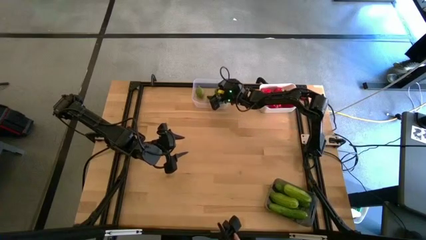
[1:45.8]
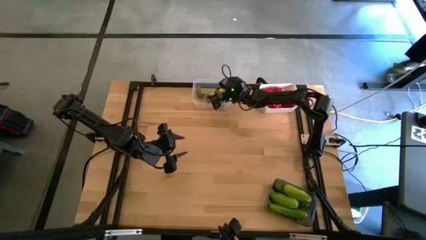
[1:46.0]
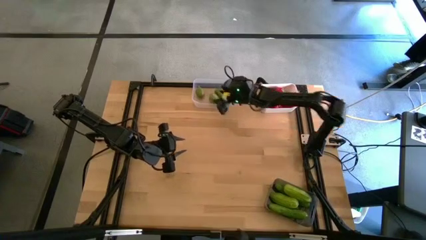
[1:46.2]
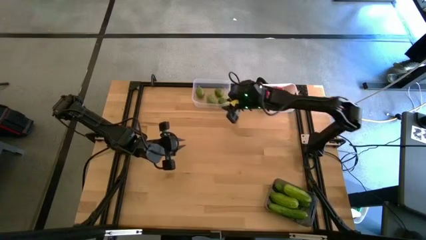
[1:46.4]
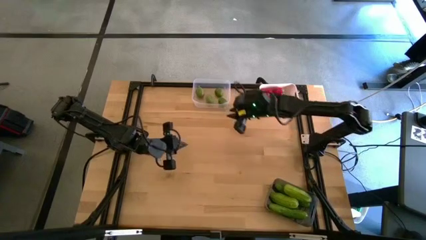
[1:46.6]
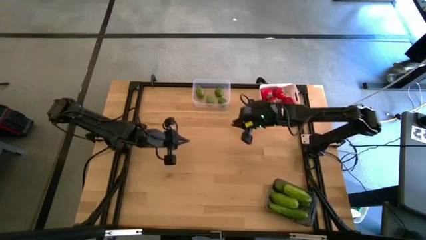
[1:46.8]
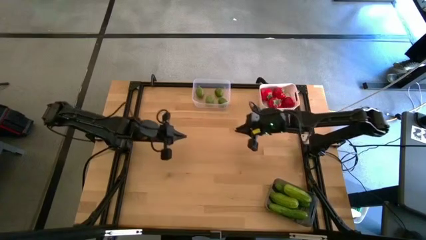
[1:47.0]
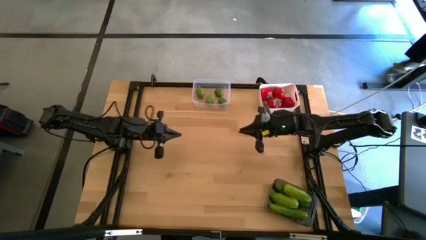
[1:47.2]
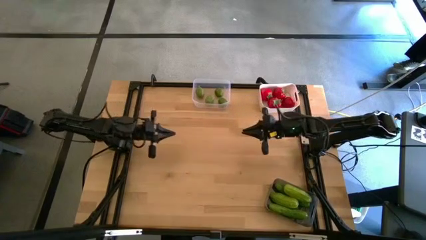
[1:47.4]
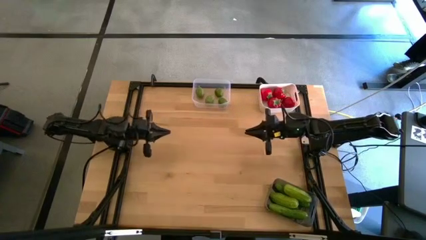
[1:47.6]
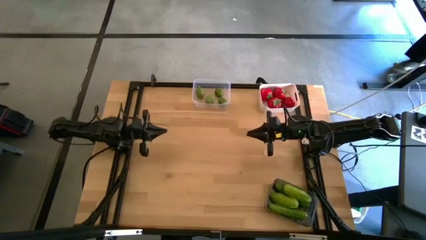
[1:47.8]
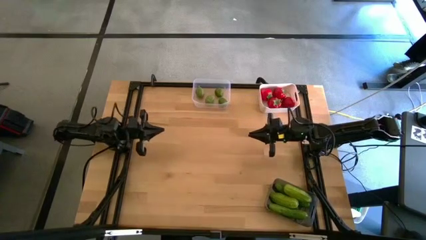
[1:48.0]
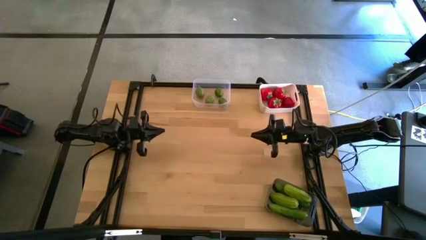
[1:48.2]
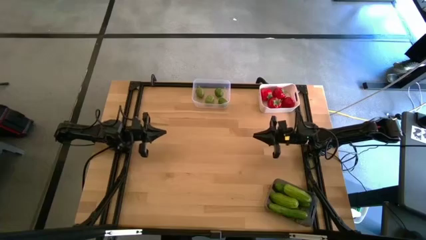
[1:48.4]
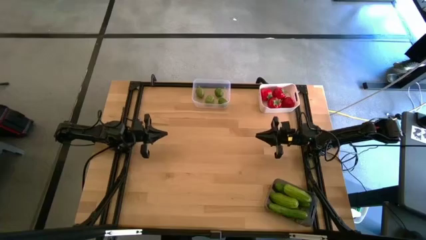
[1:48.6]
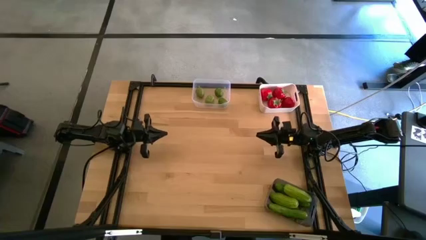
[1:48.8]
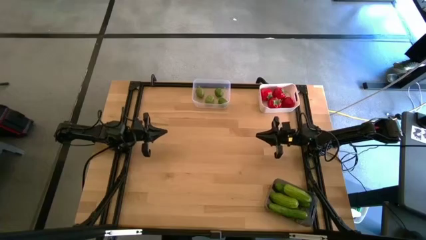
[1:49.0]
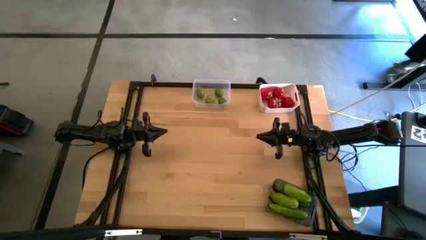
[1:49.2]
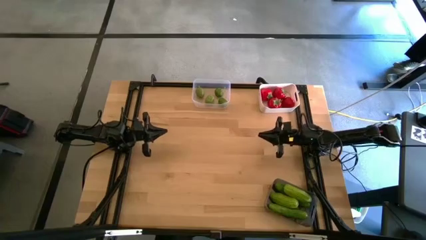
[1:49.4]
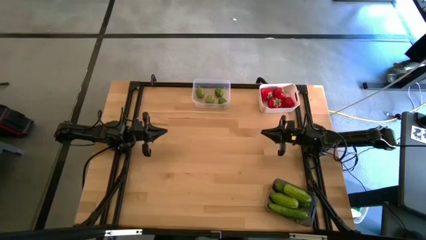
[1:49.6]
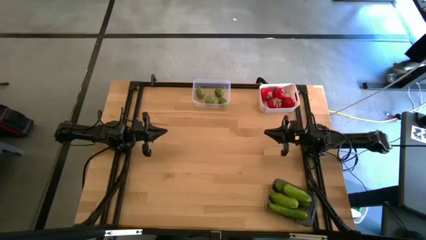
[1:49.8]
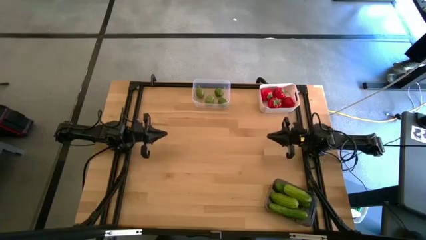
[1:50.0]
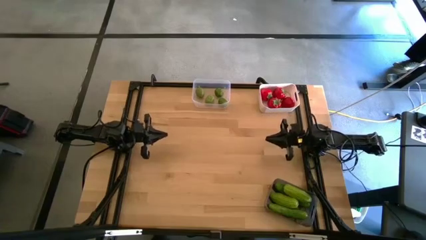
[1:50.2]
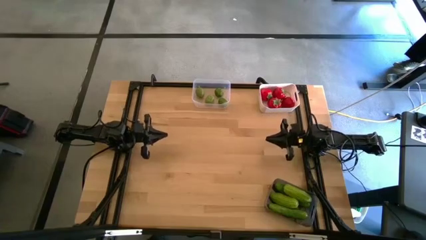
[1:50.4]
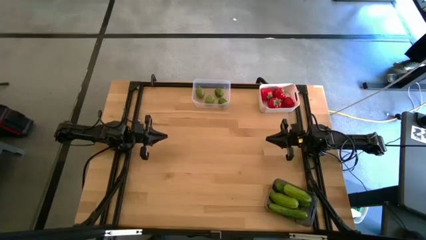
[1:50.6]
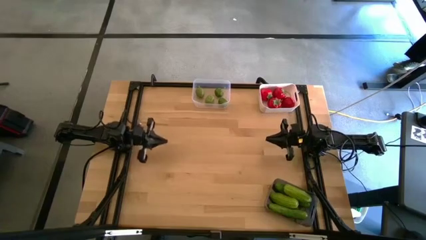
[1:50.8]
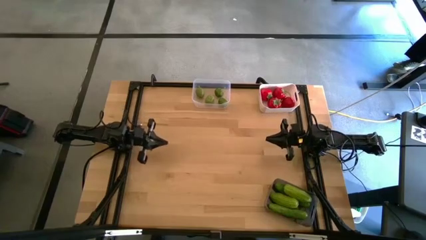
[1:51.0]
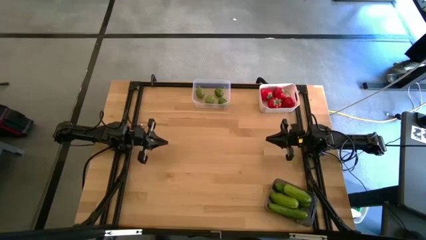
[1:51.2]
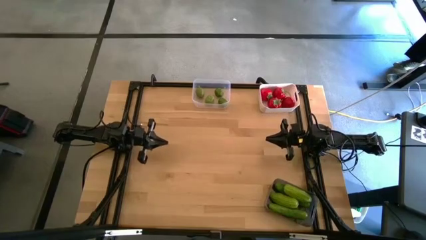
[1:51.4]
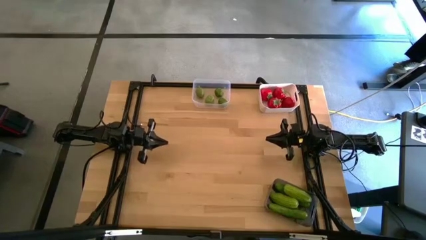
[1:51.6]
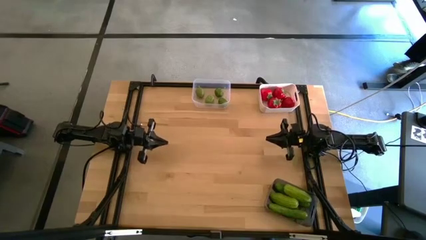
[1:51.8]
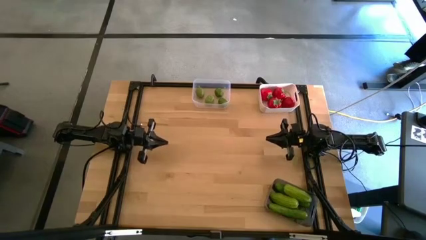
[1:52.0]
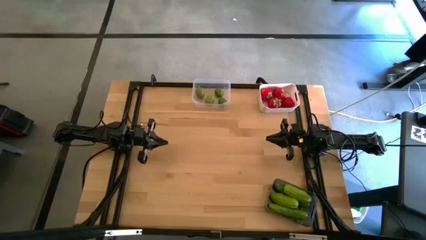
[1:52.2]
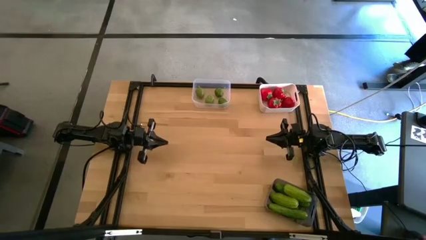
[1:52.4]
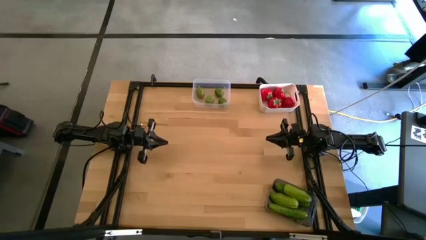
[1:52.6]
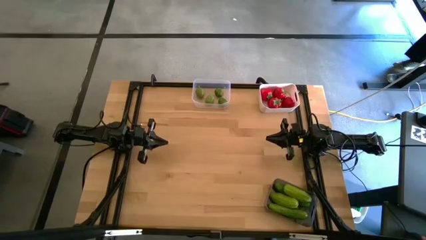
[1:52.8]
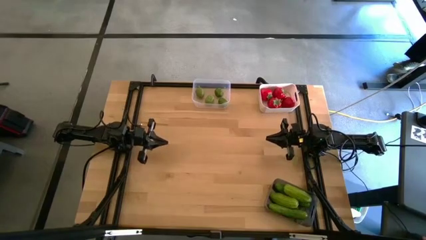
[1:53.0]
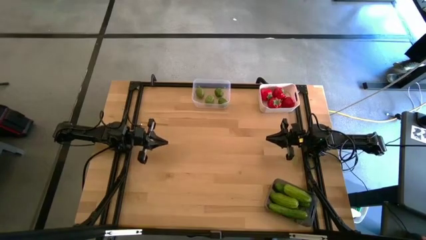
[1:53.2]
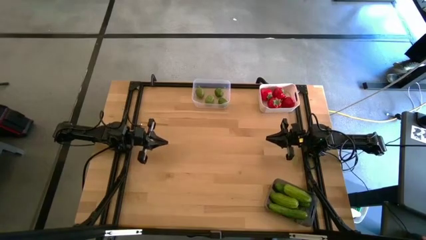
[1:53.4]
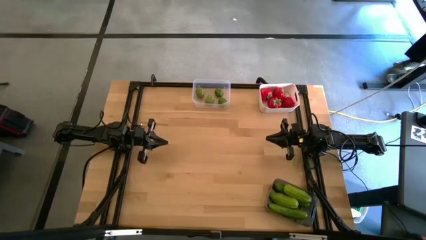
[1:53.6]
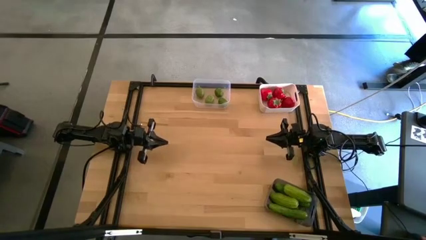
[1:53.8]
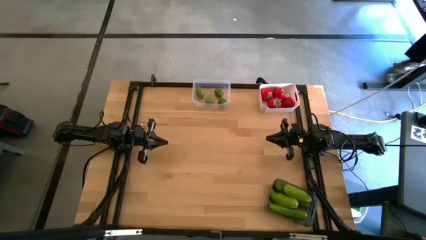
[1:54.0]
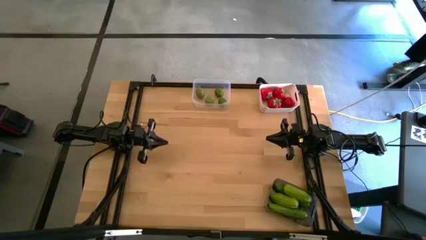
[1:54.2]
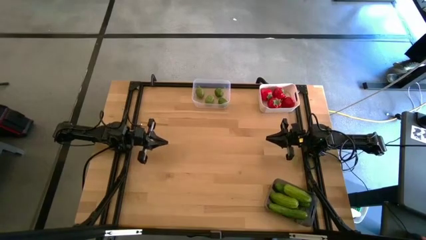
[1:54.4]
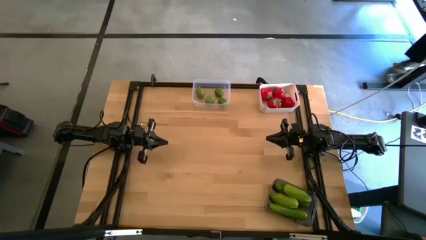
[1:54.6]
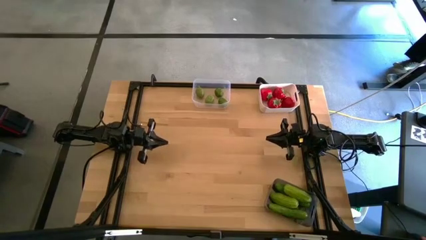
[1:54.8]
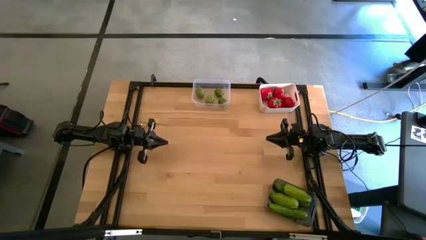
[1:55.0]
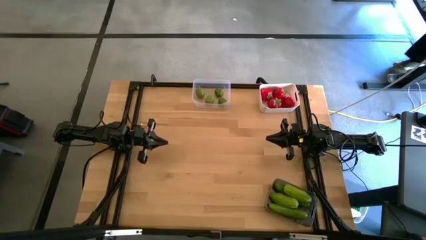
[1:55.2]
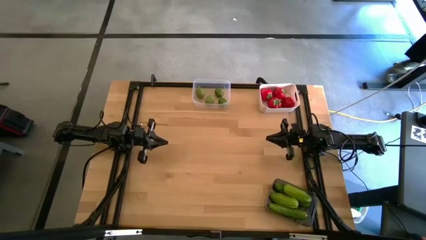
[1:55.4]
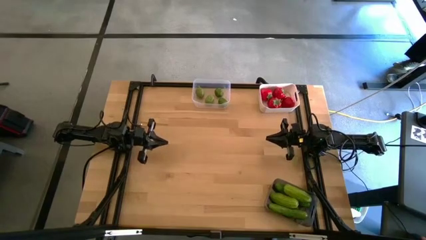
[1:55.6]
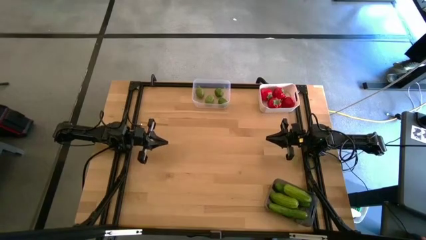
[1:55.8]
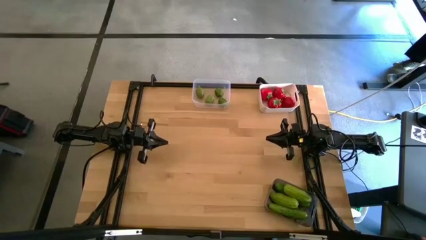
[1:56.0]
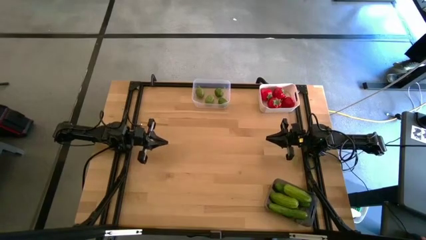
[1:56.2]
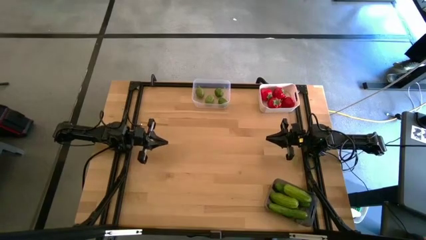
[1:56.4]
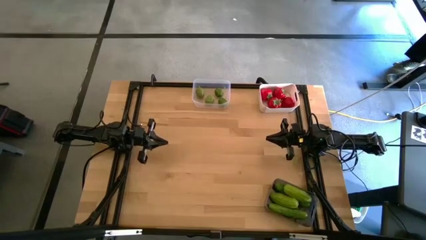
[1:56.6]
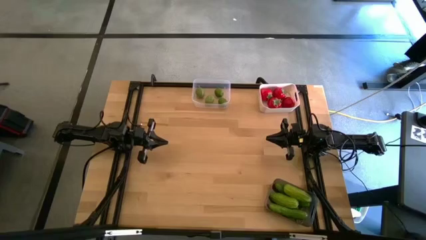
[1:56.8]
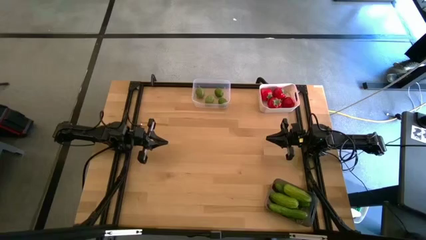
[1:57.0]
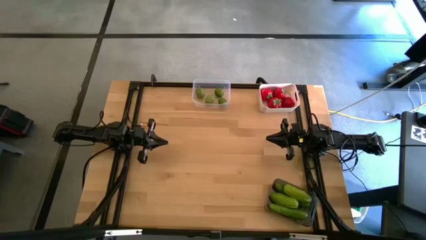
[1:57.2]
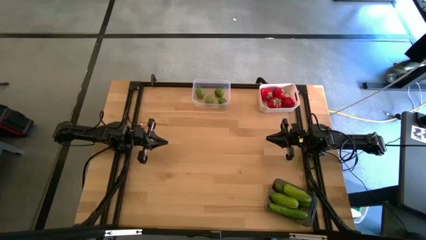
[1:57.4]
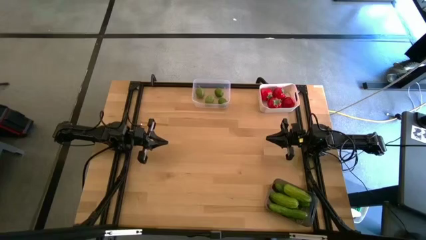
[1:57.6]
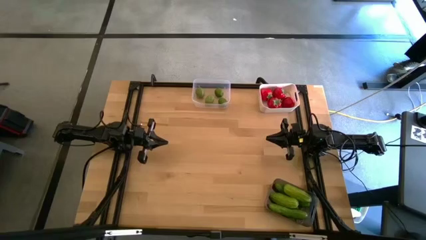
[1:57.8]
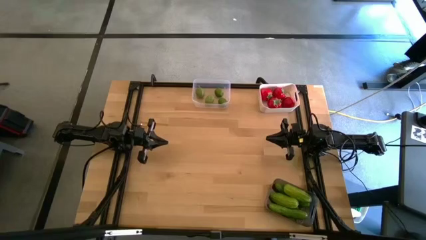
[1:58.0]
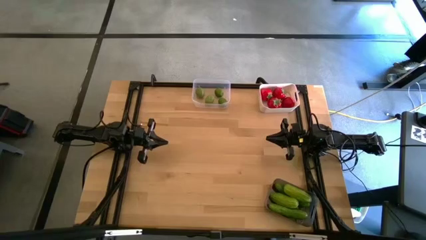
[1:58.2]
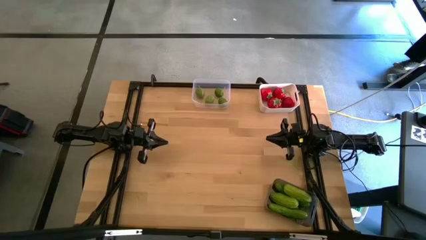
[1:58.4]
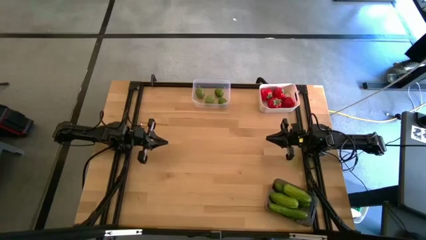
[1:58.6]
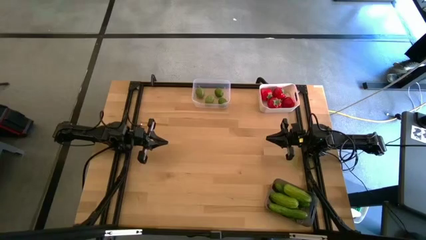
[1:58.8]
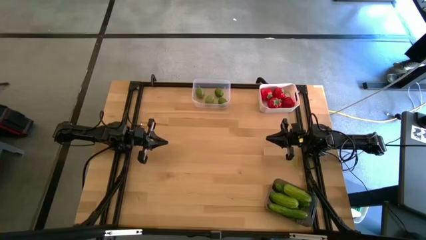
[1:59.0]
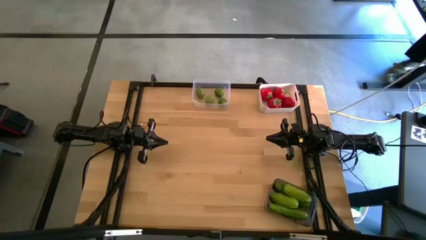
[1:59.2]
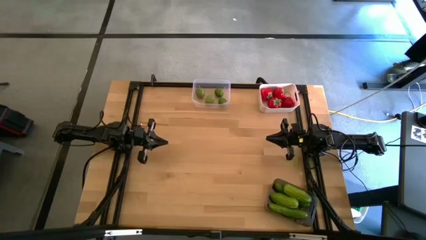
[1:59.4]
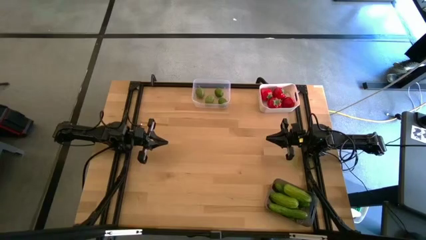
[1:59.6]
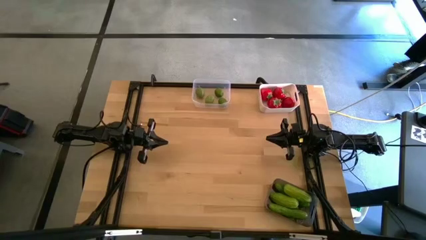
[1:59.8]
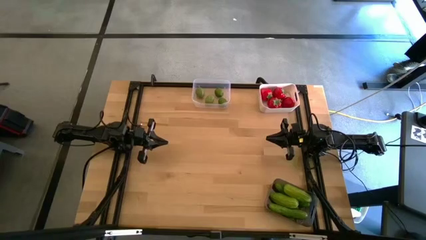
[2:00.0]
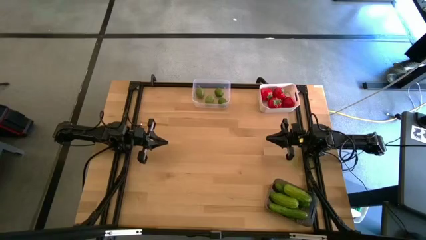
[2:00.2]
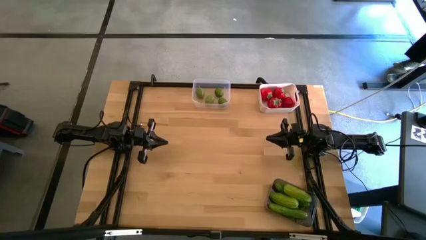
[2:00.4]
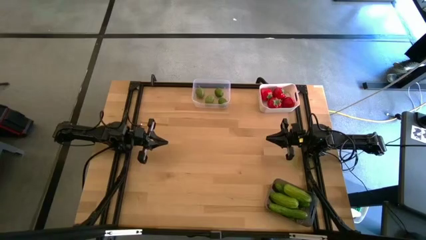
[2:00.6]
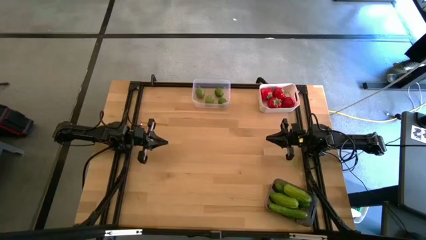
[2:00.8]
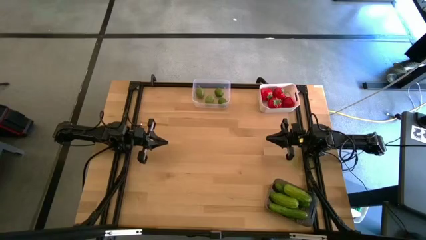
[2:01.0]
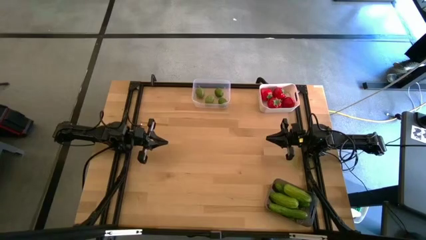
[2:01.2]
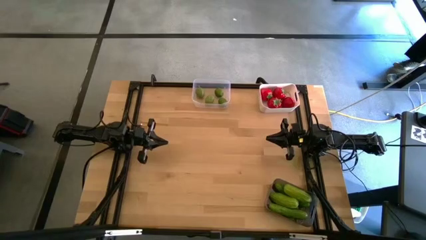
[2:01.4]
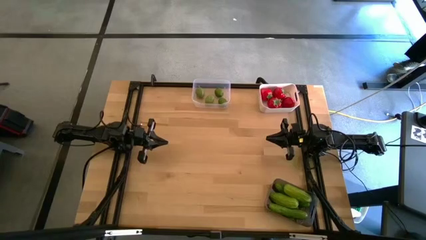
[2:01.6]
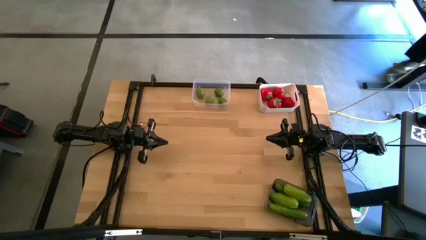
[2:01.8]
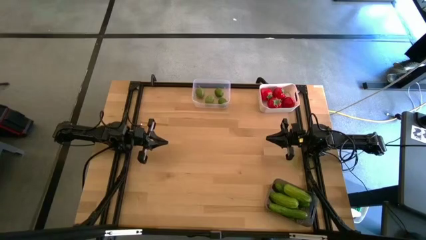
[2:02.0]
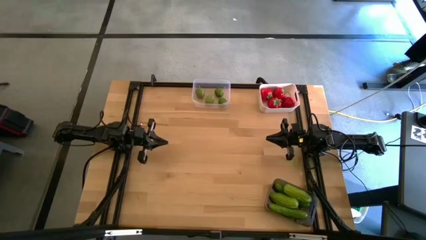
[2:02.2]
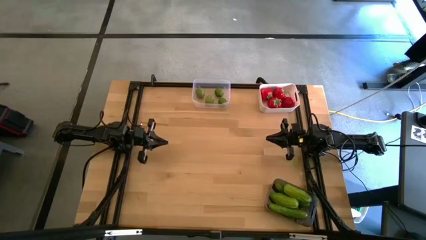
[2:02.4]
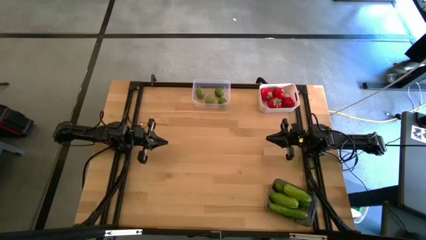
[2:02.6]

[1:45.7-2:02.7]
Task: Sort produce into baskets
Return to Home Position

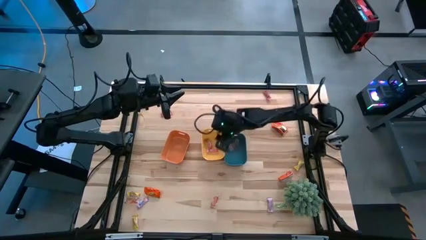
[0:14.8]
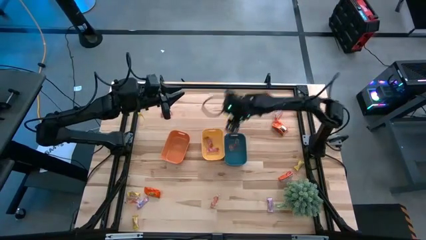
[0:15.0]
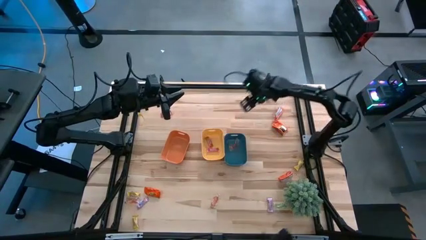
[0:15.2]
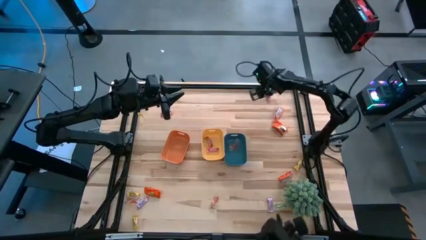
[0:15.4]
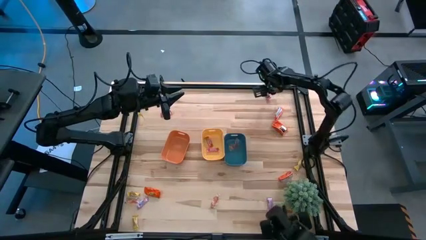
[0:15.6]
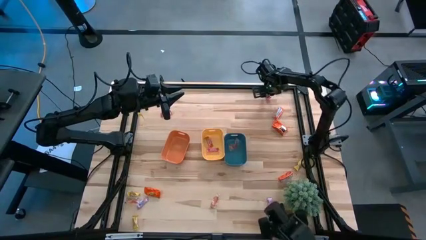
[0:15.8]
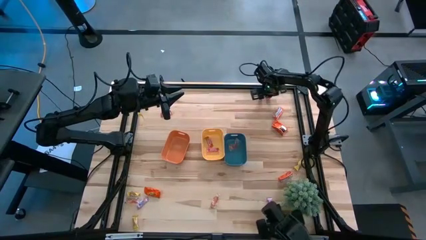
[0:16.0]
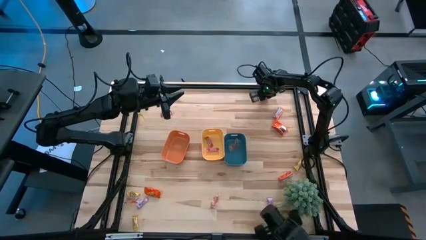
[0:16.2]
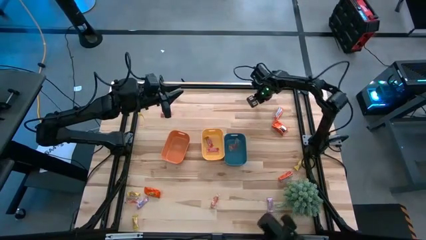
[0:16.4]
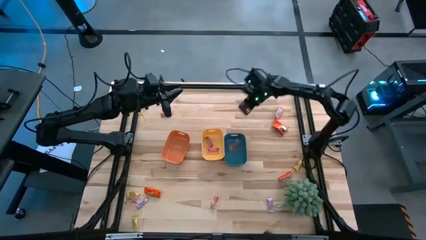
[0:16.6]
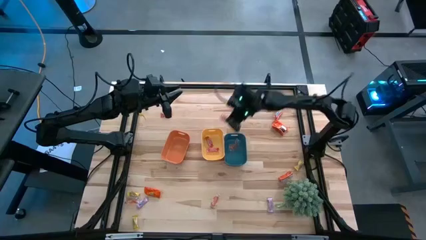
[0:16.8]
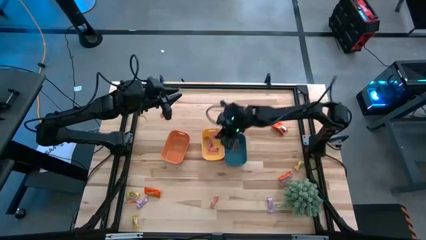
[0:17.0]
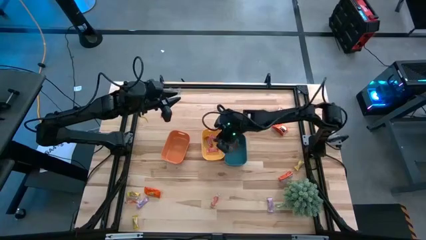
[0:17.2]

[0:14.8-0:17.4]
Task: Sort candy
Put the red candy into the yellow bin
